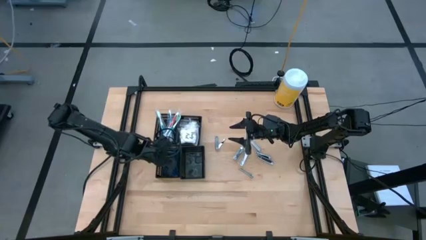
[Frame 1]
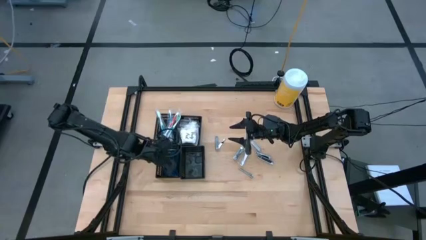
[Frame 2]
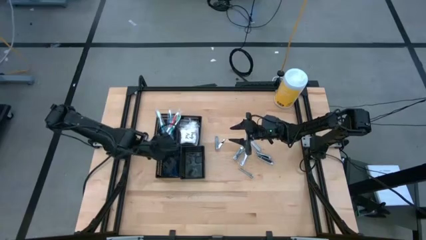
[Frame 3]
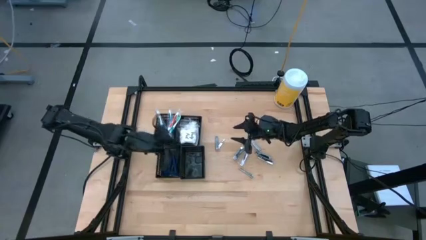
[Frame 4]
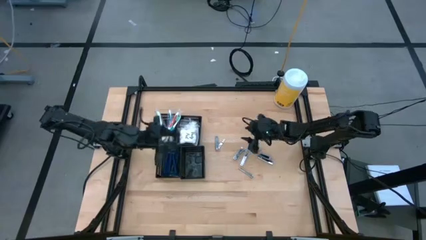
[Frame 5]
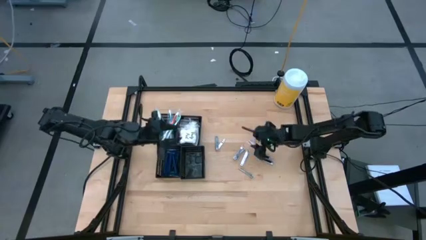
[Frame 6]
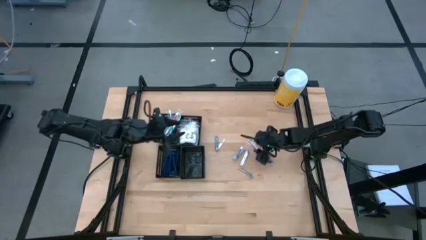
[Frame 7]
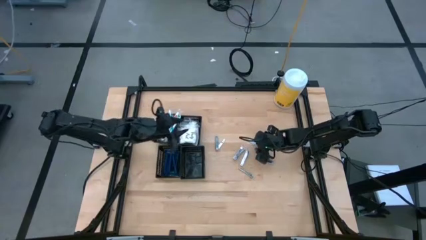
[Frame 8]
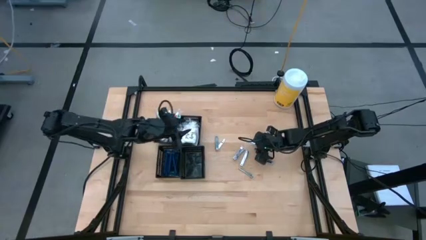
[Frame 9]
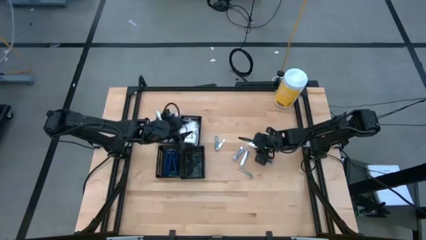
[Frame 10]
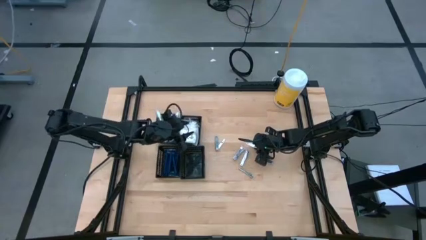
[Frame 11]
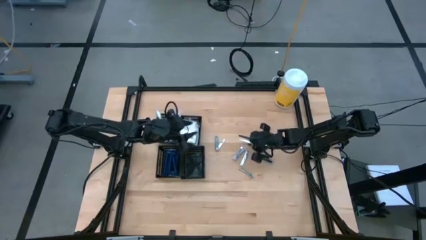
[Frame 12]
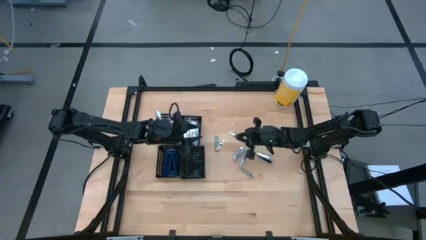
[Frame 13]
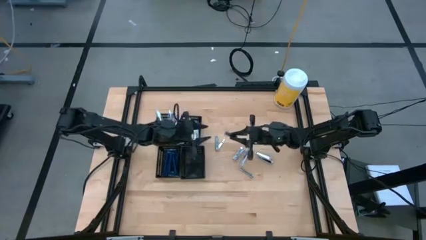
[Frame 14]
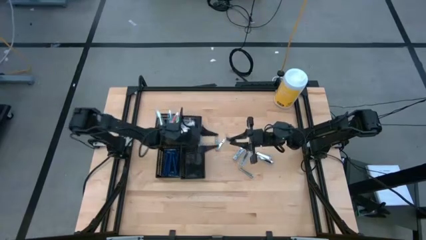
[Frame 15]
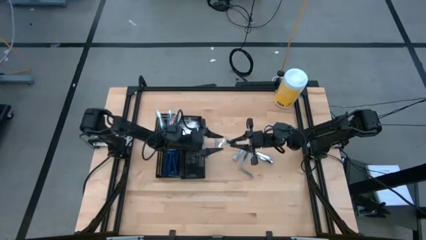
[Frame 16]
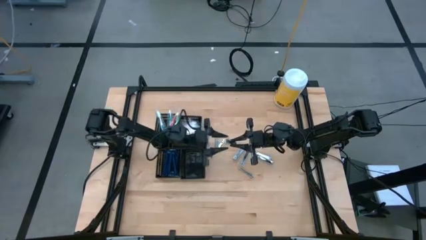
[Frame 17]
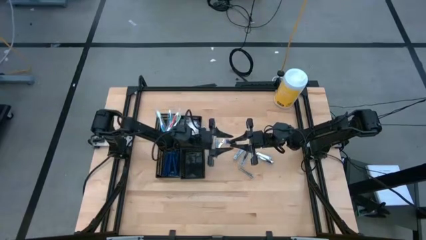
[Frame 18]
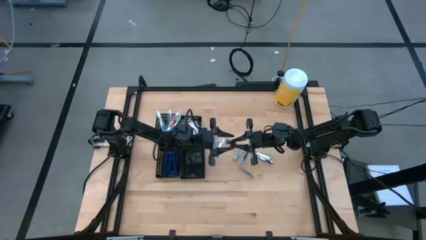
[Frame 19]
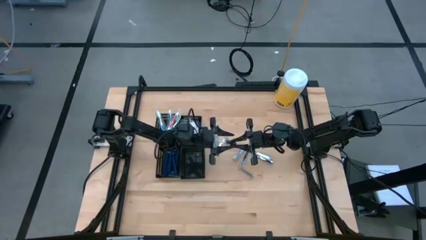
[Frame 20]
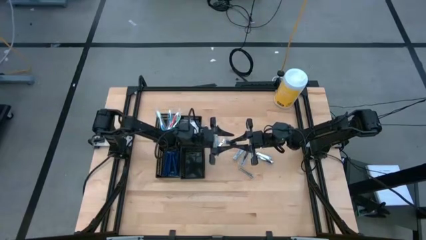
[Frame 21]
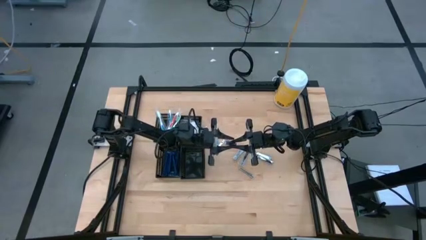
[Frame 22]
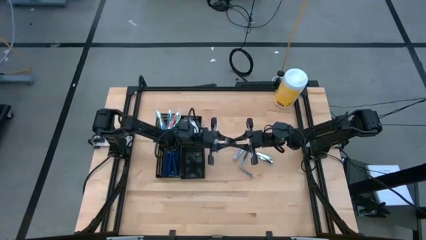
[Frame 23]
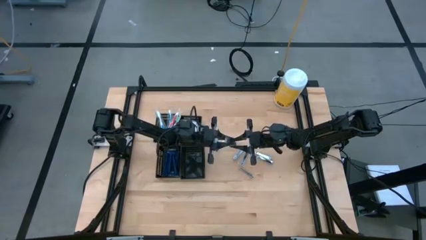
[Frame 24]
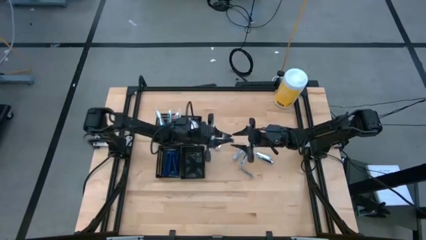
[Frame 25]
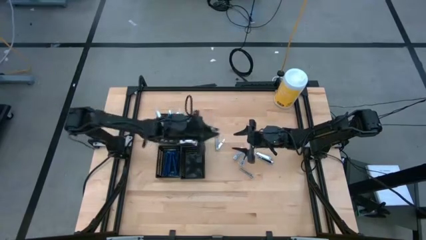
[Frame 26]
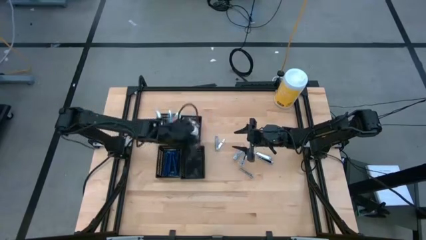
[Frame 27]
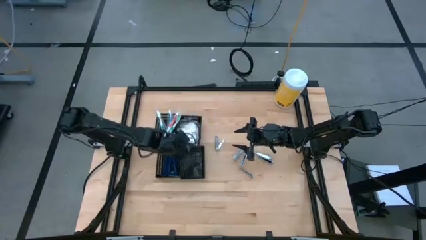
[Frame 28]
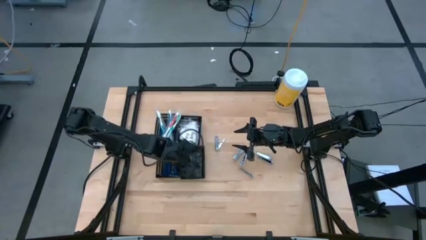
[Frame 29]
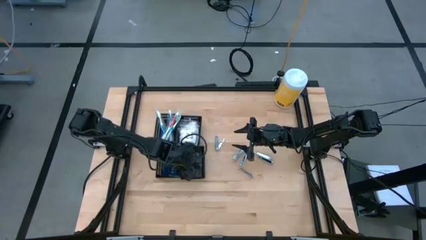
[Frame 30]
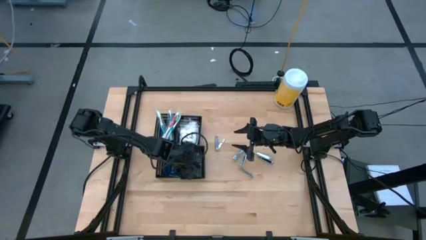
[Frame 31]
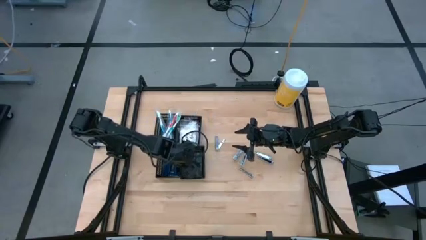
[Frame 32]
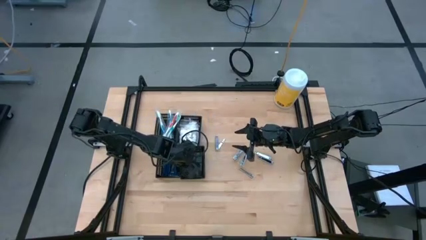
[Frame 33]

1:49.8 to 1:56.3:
Task: Pick & Place Travel size toiletries
Put the nail cutter into the bottom right black bin

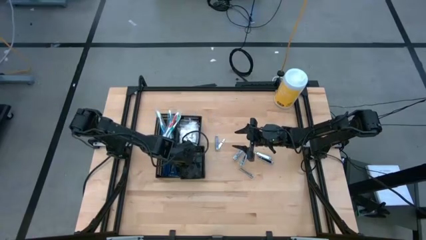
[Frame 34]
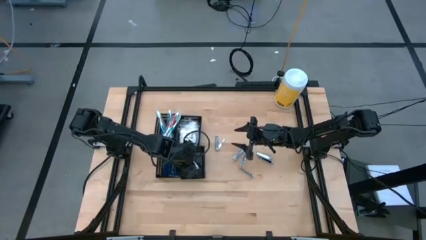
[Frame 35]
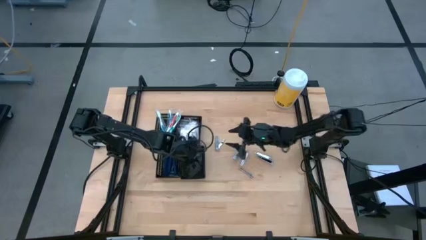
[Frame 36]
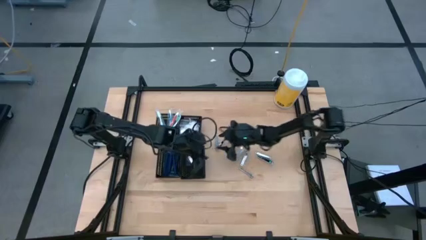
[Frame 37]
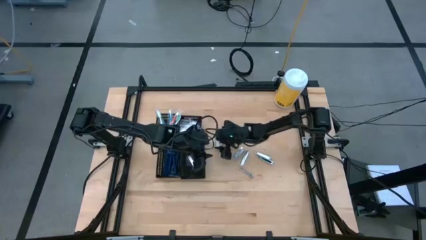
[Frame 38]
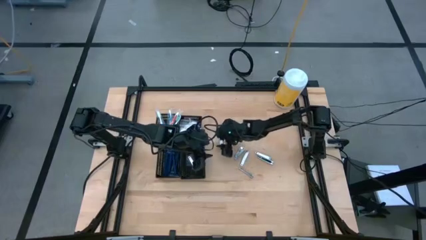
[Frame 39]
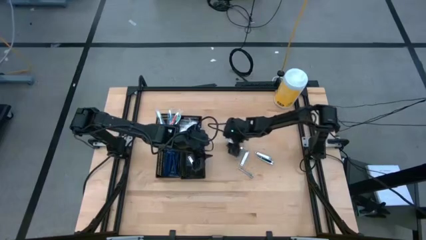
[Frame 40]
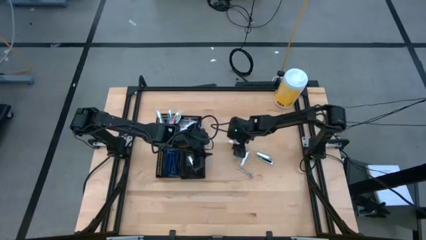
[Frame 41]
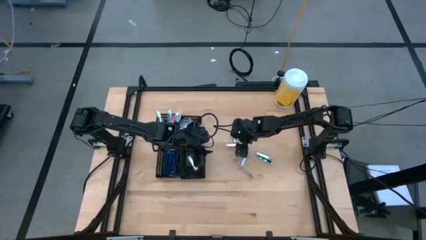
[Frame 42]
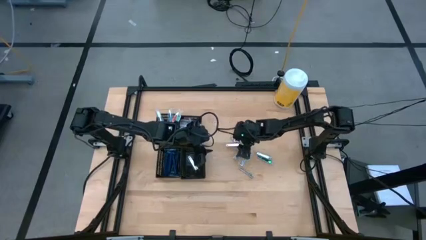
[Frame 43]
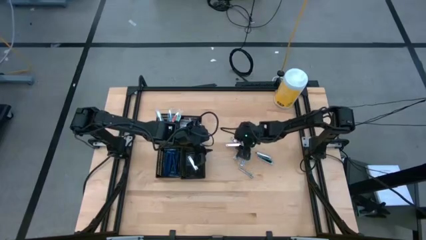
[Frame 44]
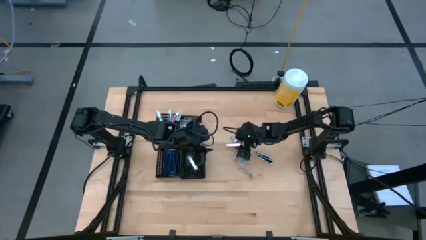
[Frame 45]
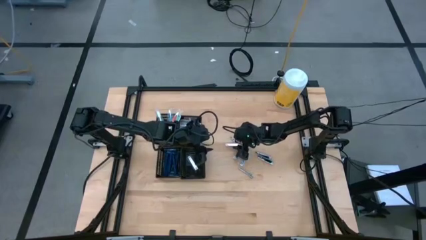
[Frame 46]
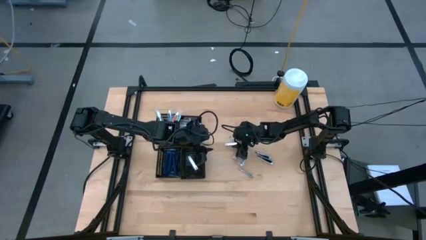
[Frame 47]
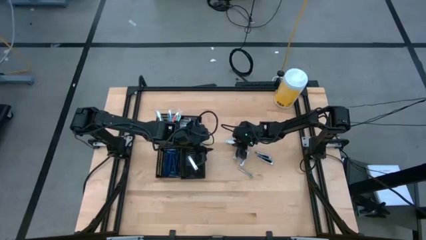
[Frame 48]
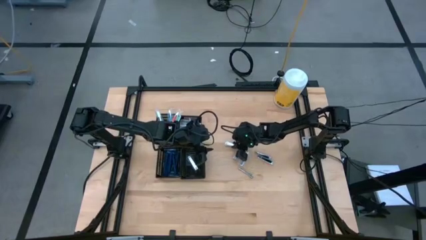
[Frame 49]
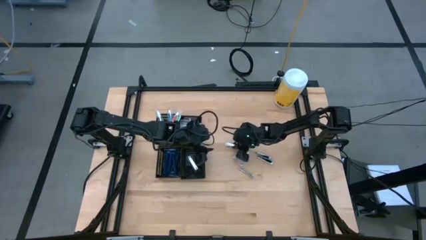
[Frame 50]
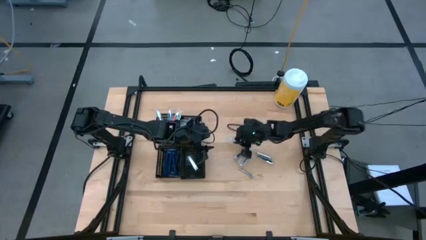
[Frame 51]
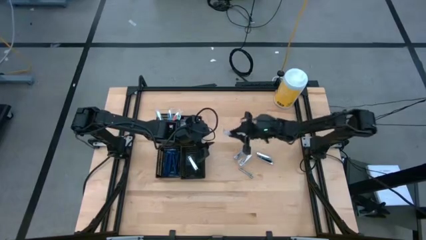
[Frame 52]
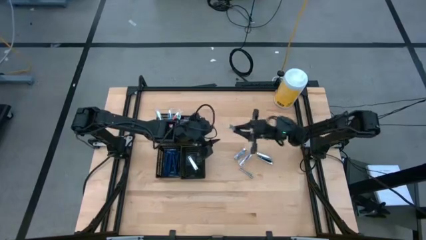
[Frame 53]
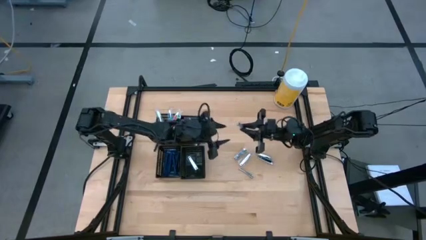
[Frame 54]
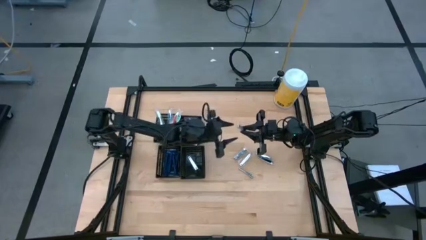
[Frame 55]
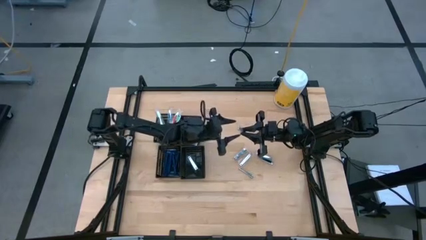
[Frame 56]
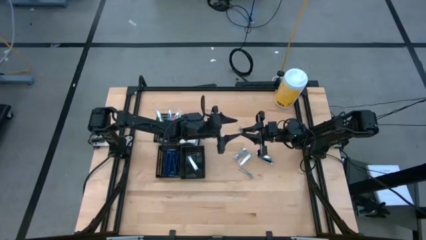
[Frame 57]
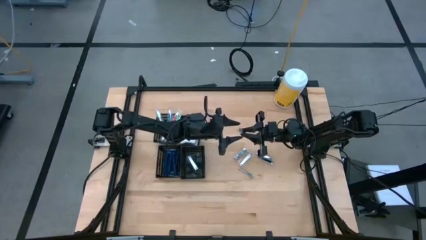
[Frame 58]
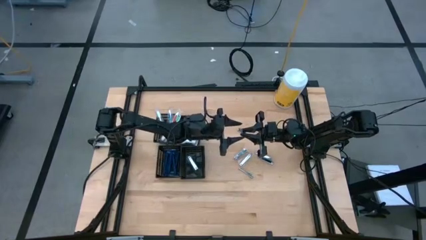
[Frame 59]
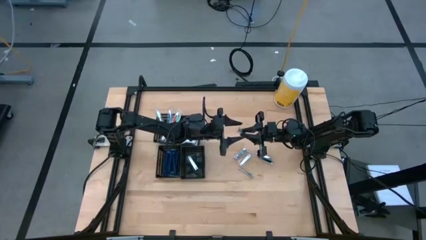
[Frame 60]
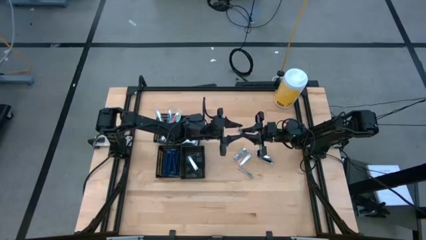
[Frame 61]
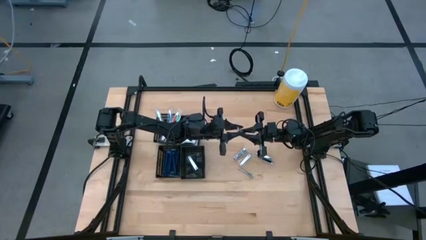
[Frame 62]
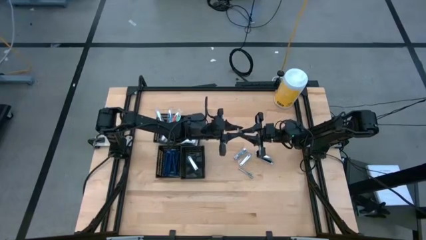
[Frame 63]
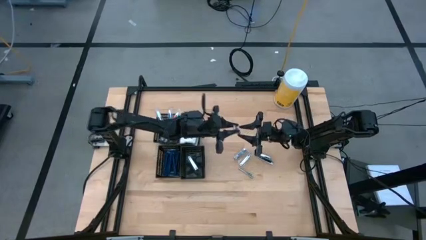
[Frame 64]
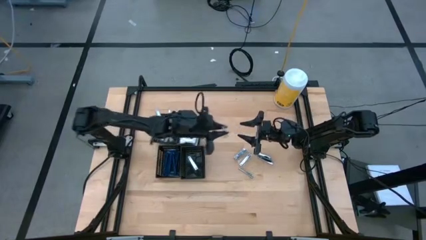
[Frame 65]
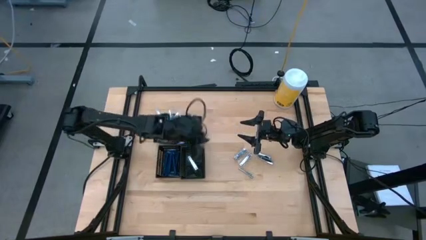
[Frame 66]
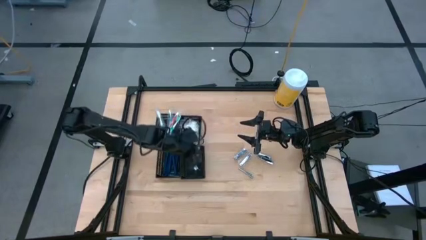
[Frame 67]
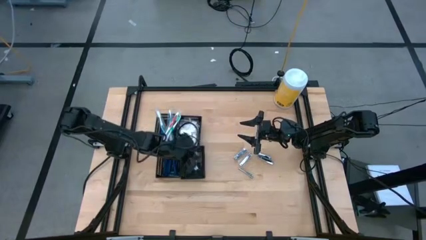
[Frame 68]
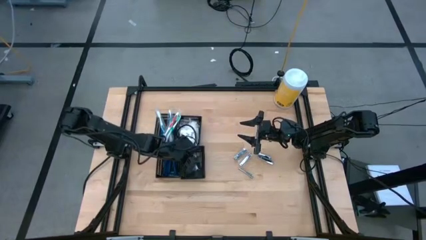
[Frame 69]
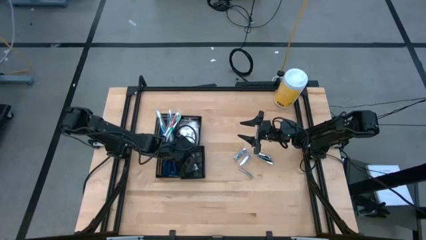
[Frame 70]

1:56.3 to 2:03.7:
Put the nail cutter into the bottom right black bin
